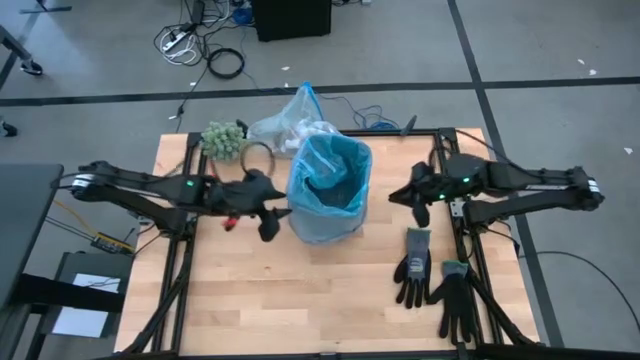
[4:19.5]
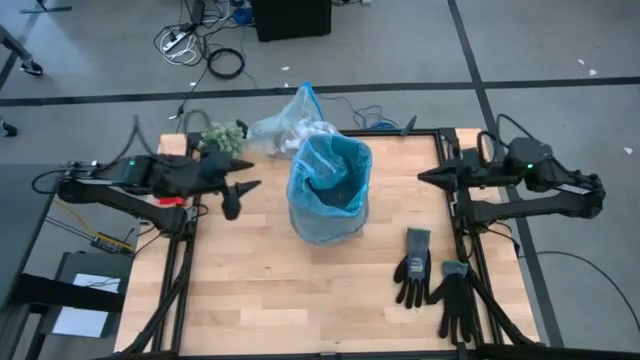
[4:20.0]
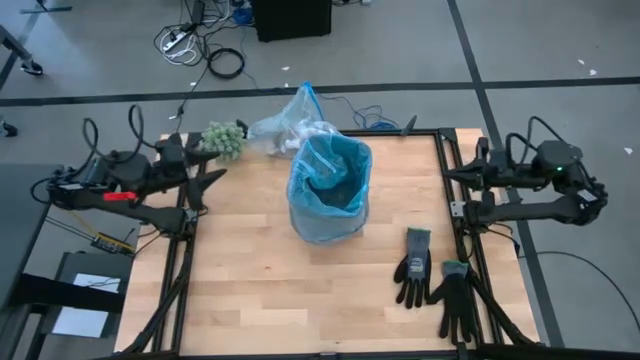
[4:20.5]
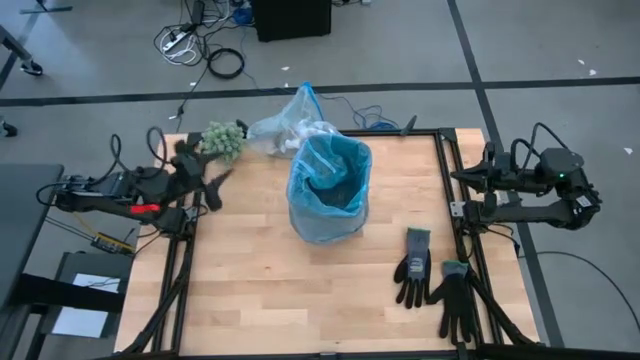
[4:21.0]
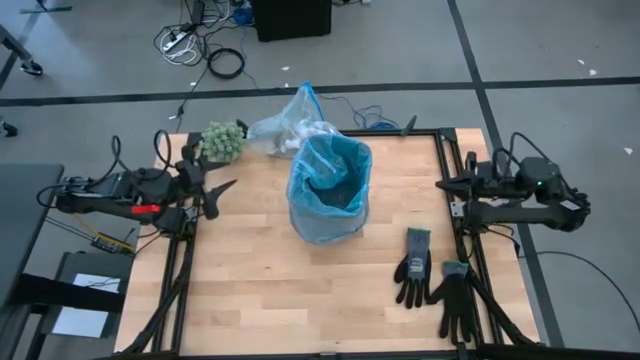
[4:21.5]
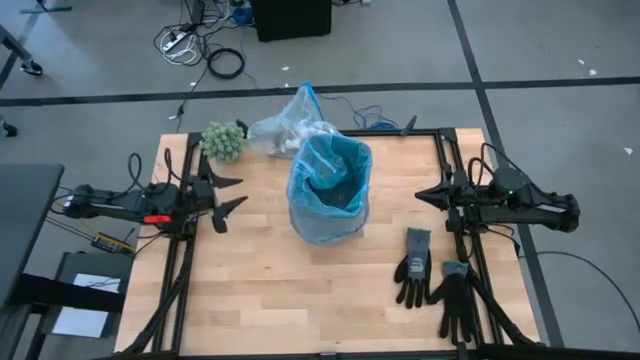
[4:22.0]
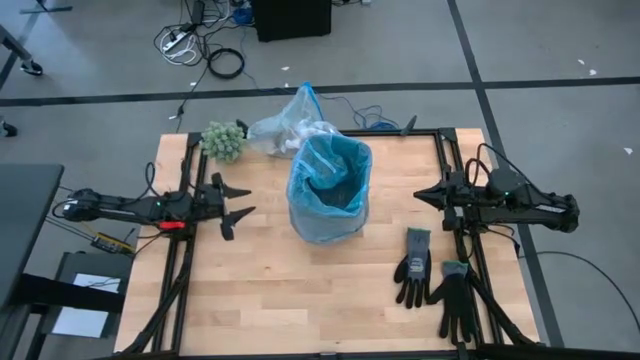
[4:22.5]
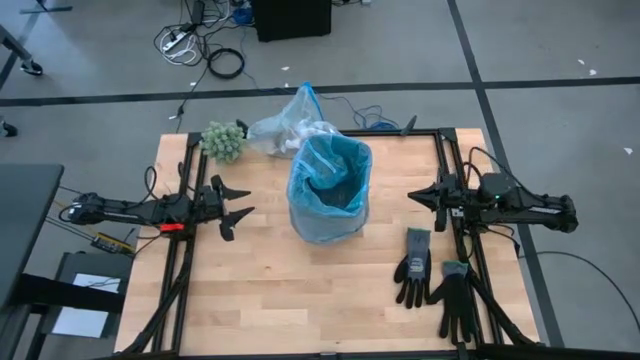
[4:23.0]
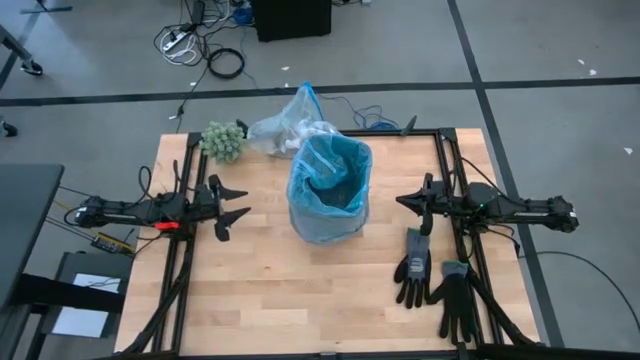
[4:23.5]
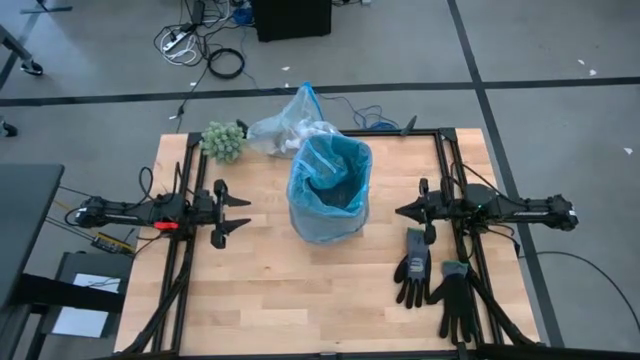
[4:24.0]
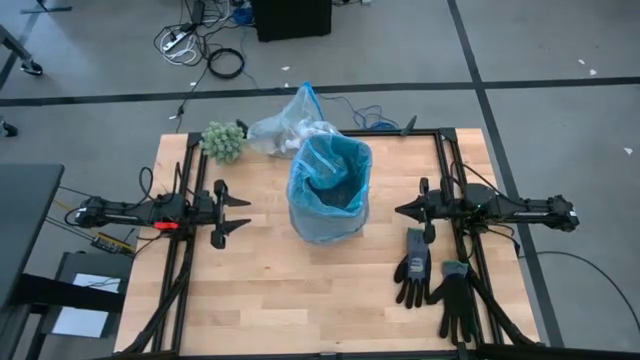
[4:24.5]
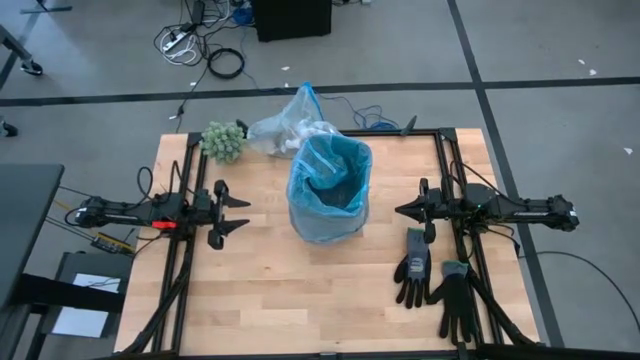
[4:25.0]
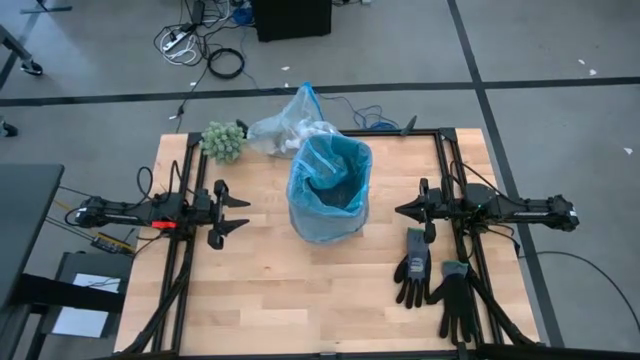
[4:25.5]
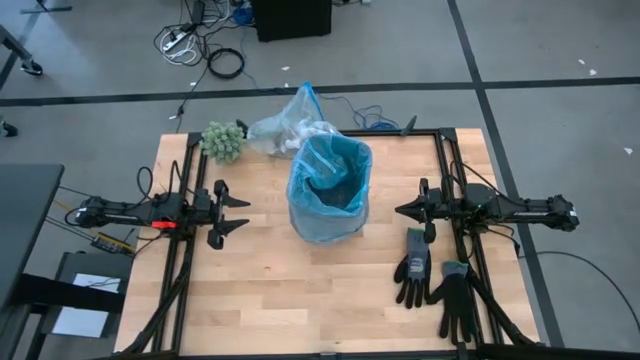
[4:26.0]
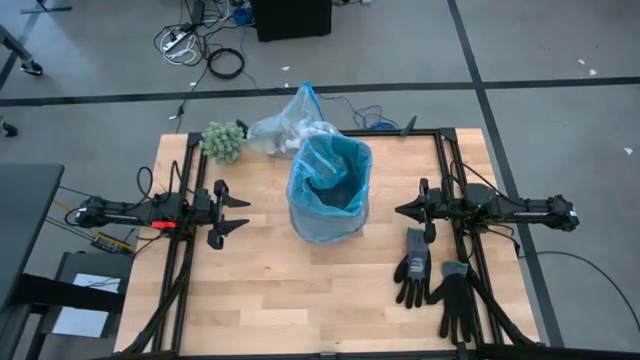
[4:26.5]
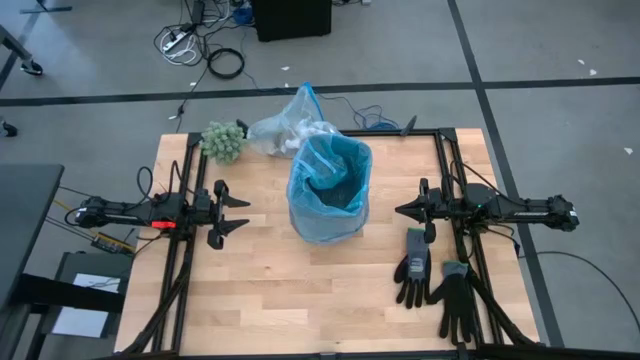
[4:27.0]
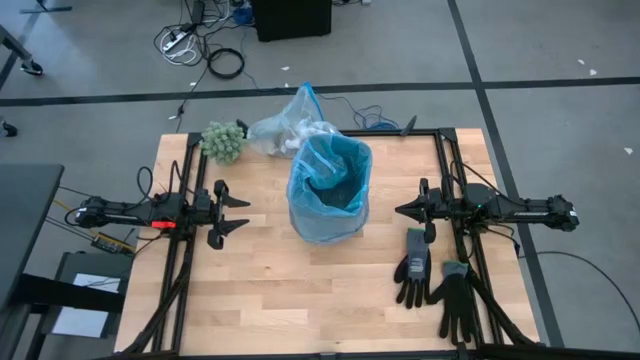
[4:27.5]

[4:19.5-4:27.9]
Task: place trash/remove bag and relplace
Return to Home Position

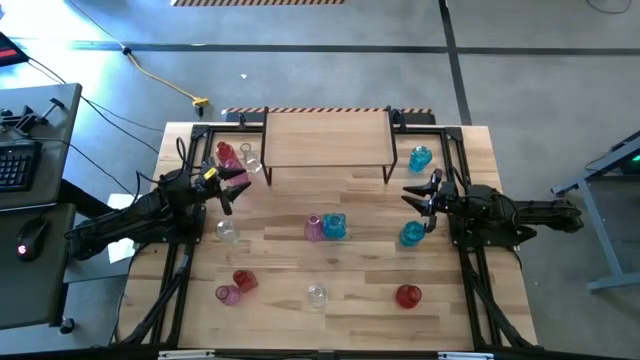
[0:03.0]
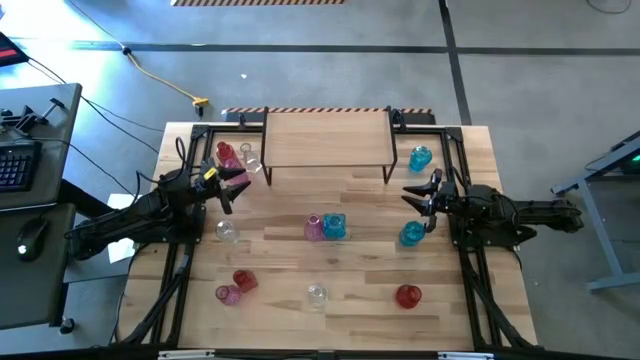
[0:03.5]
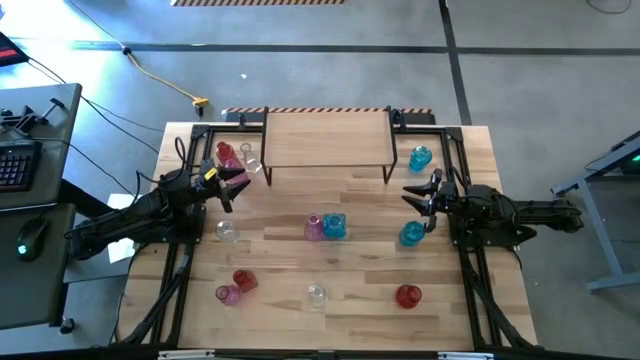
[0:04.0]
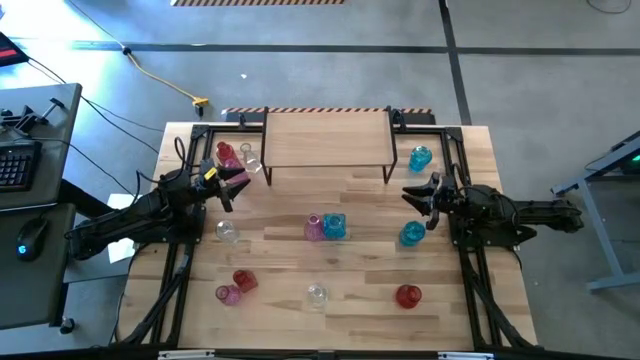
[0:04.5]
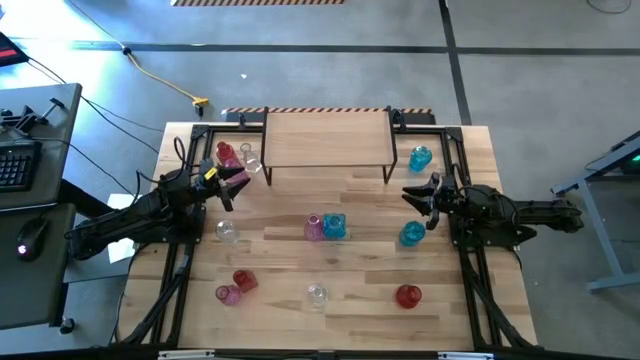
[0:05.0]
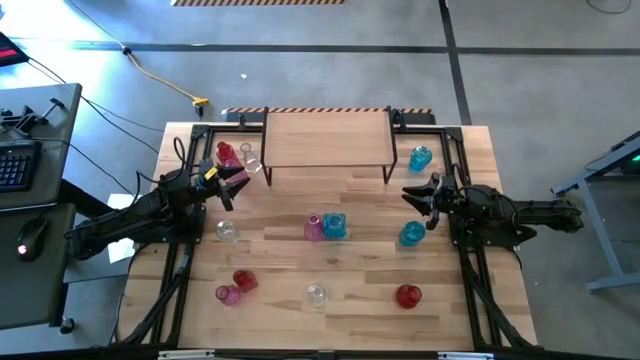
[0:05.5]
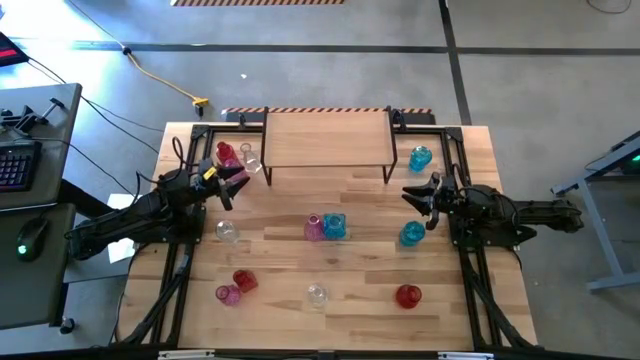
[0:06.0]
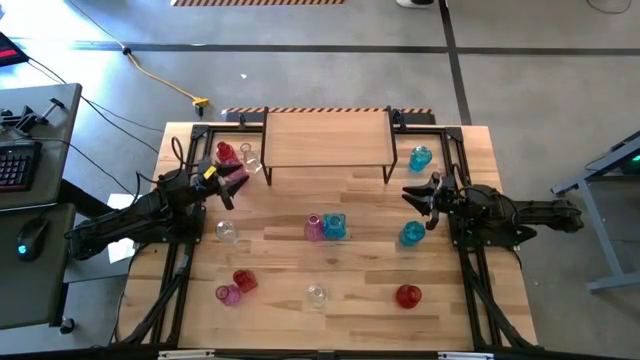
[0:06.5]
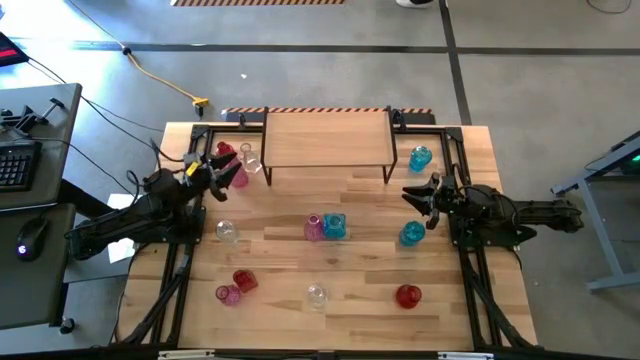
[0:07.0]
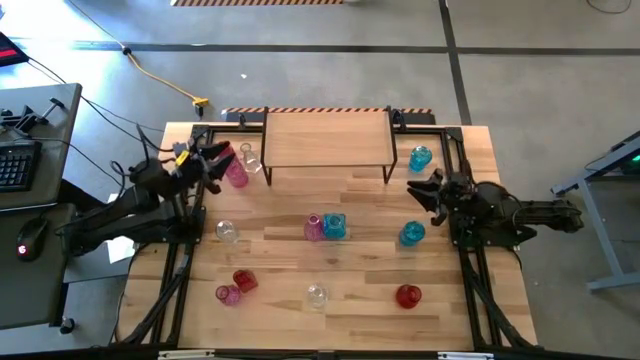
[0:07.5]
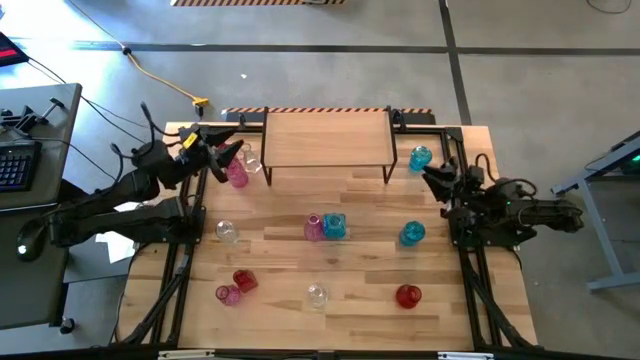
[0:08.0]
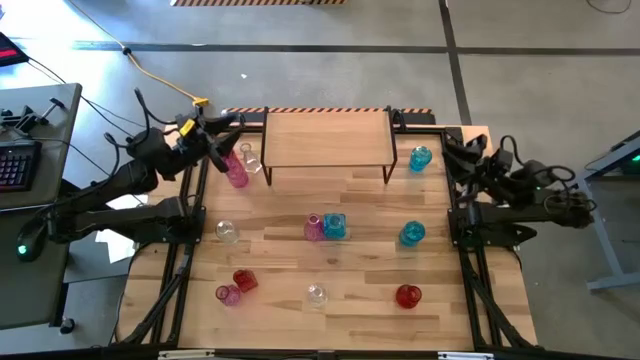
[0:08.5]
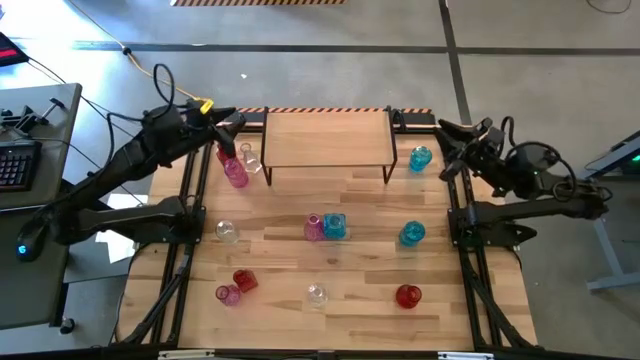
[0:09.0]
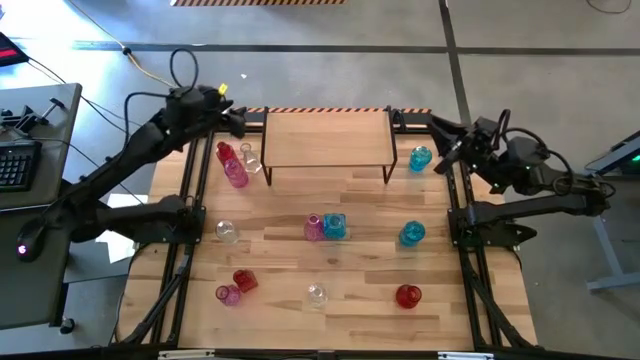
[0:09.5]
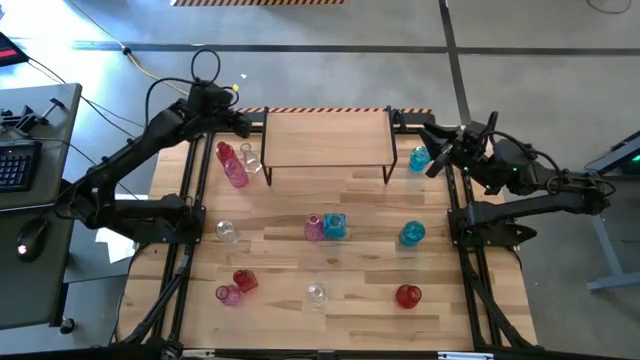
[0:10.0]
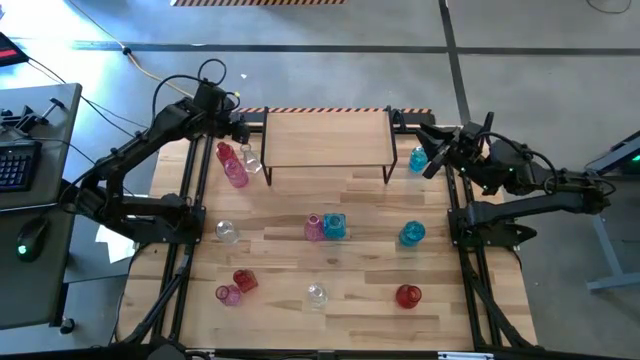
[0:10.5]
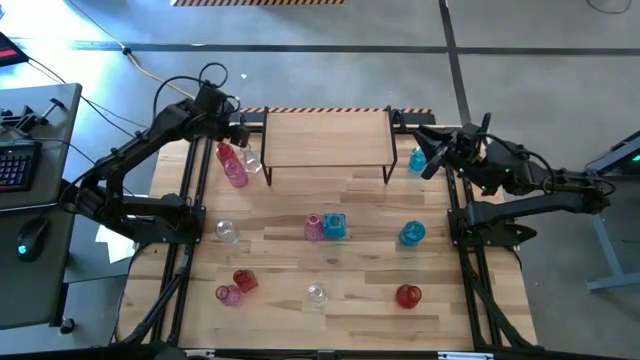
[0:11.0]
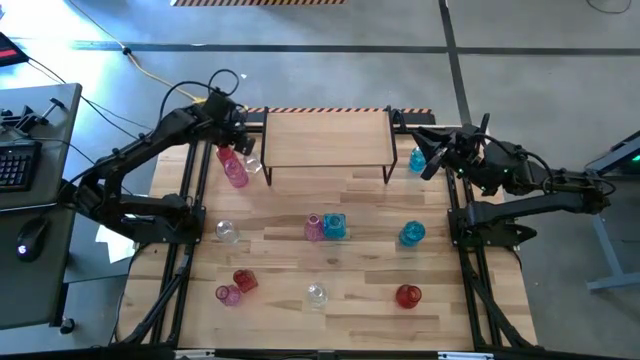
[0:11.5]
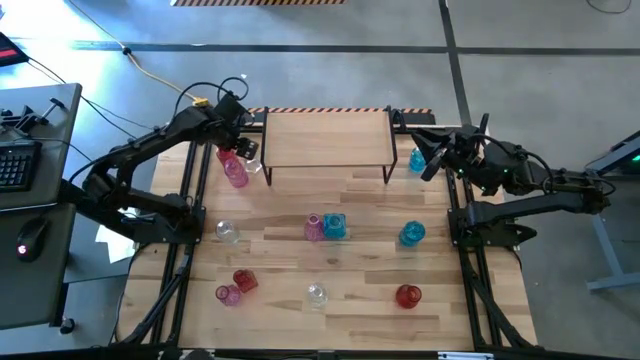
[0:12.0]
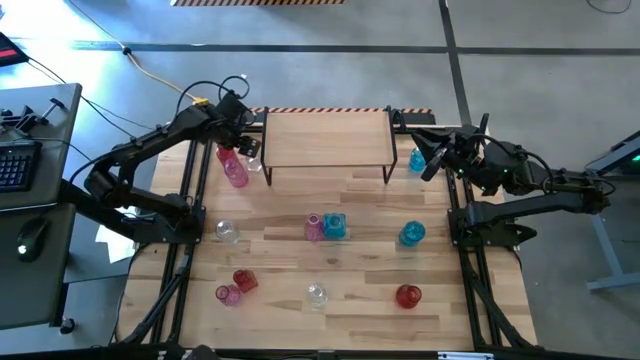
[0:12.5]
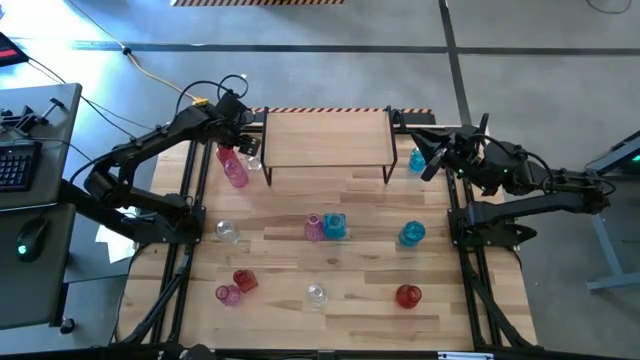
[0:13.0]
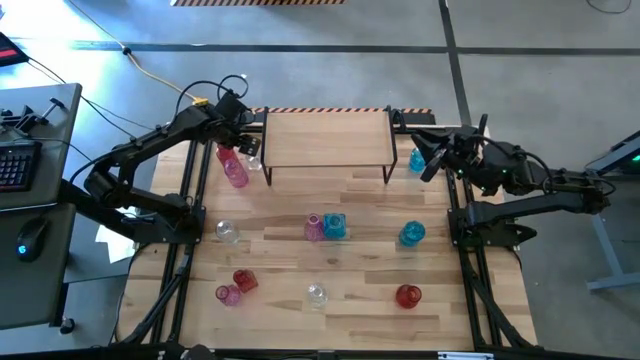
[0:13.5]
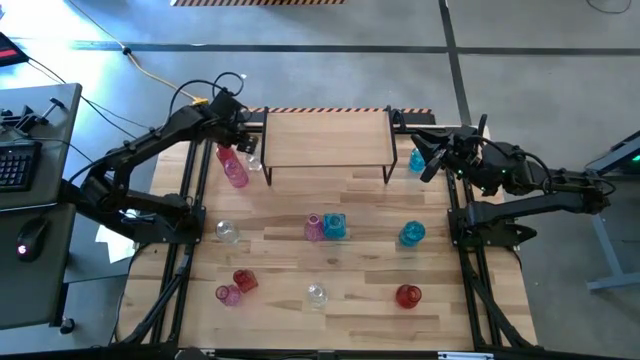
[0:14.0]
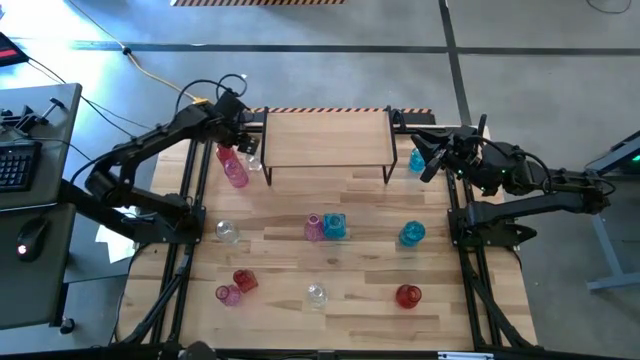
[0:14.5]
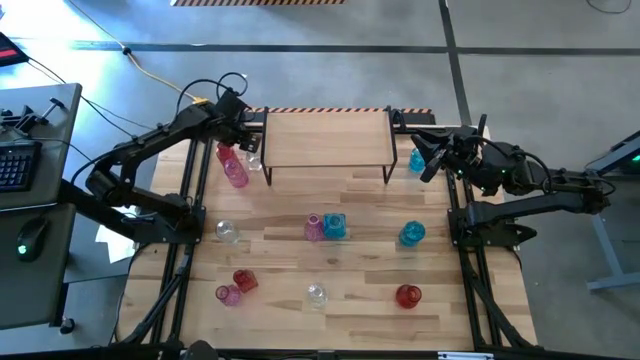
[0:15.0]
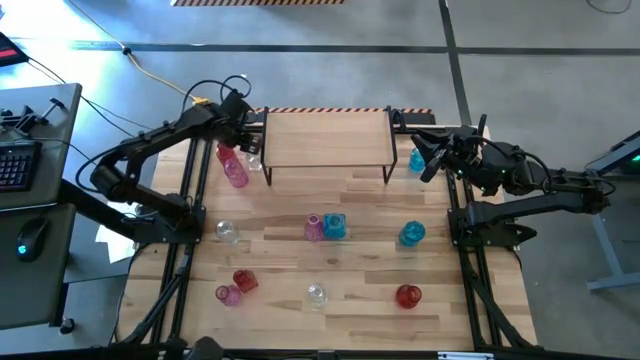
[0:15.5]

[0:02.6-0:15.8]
Task: sort vases onto shelf
Put the top transparent vase on the shelf
